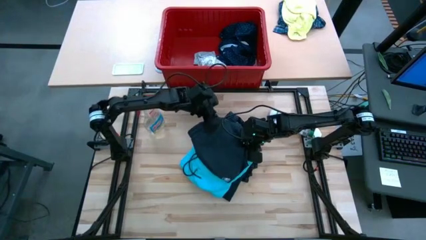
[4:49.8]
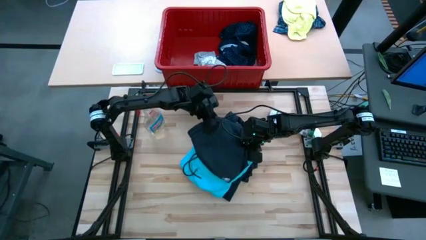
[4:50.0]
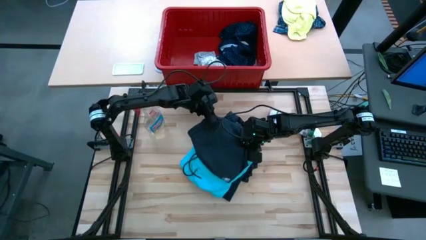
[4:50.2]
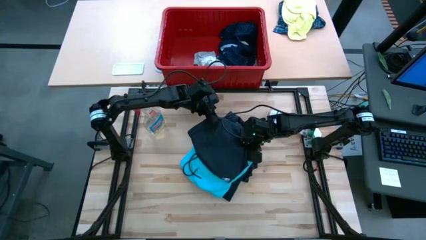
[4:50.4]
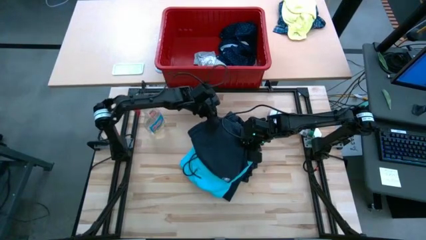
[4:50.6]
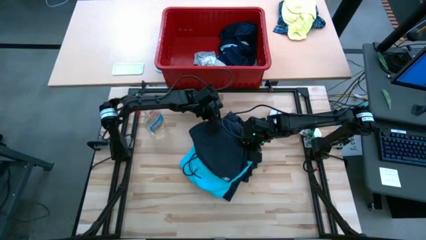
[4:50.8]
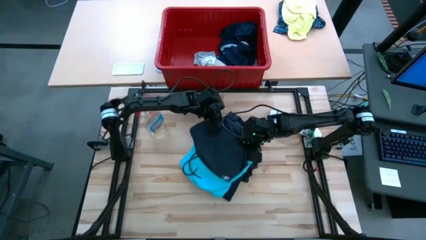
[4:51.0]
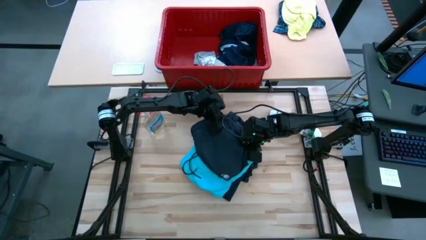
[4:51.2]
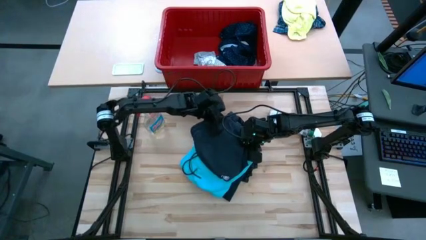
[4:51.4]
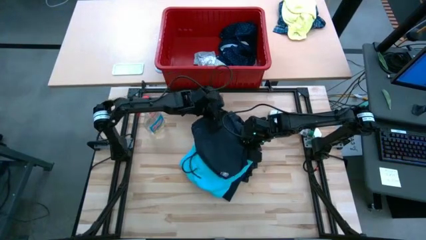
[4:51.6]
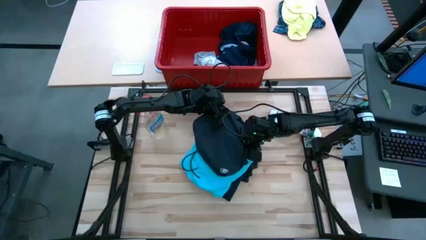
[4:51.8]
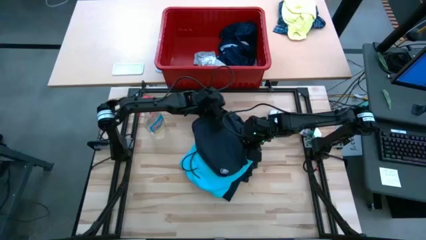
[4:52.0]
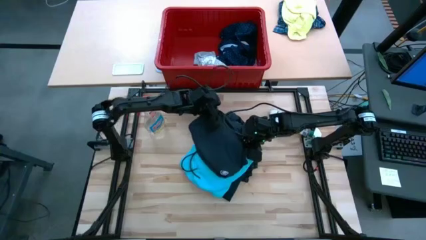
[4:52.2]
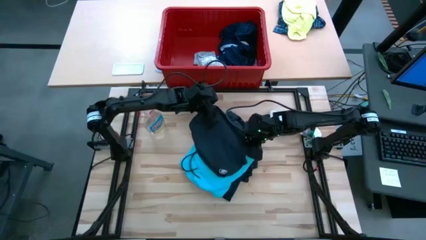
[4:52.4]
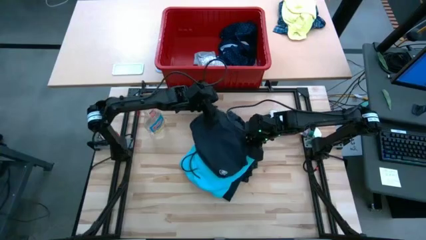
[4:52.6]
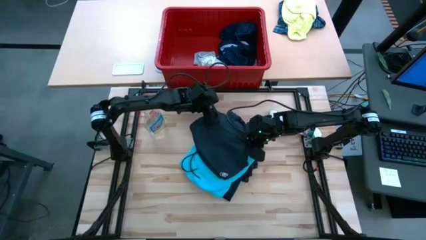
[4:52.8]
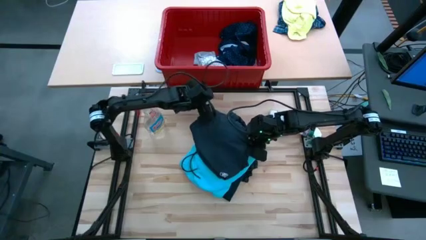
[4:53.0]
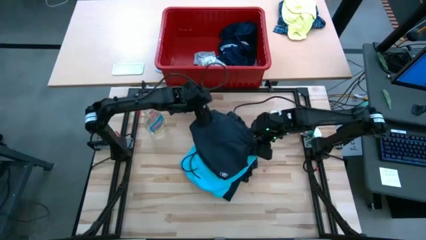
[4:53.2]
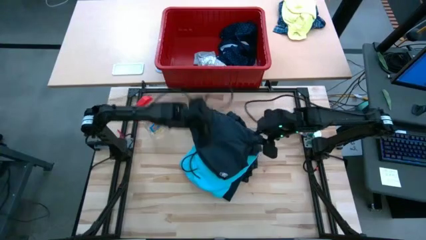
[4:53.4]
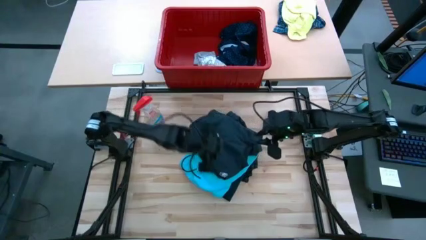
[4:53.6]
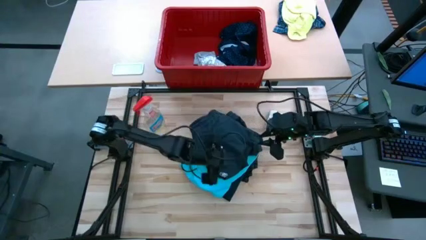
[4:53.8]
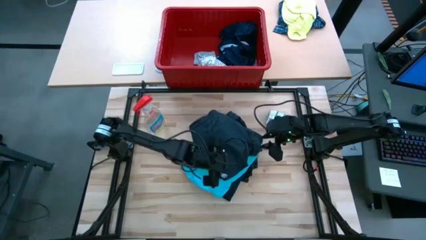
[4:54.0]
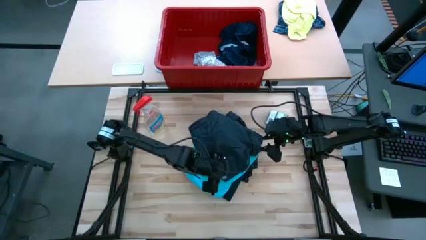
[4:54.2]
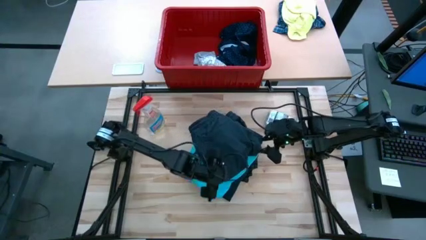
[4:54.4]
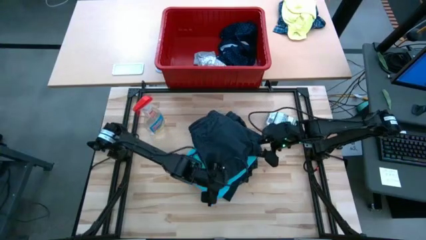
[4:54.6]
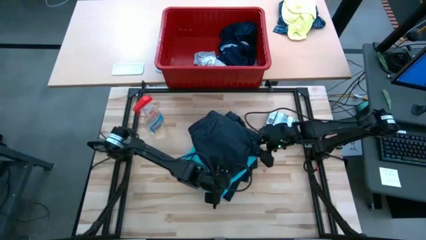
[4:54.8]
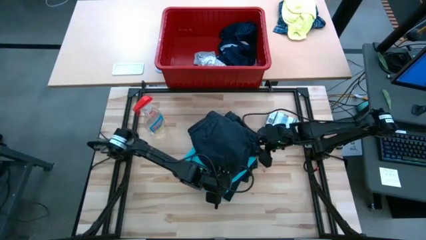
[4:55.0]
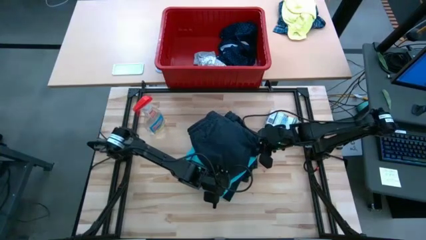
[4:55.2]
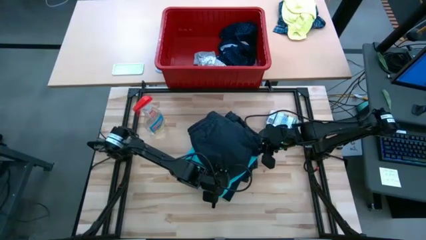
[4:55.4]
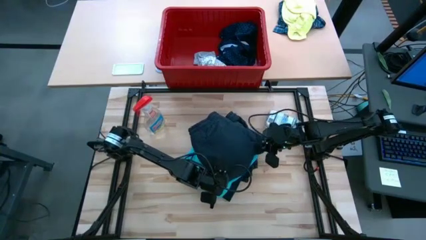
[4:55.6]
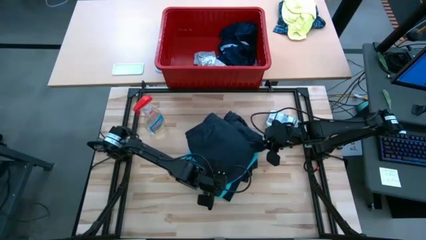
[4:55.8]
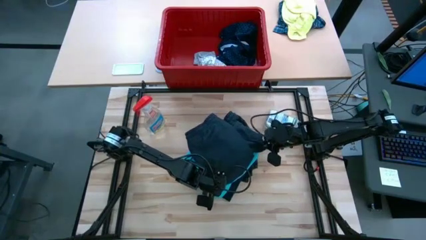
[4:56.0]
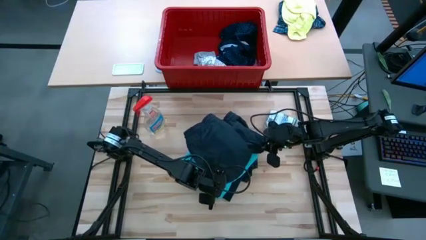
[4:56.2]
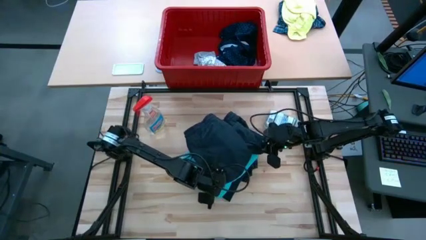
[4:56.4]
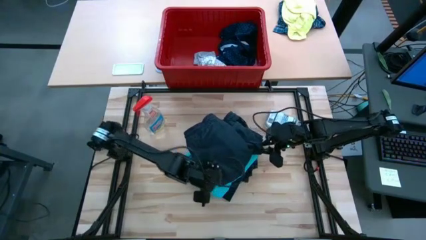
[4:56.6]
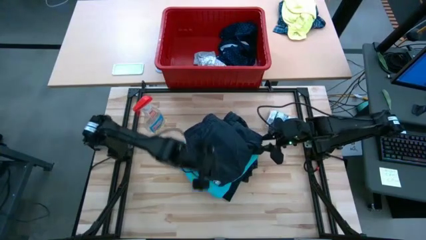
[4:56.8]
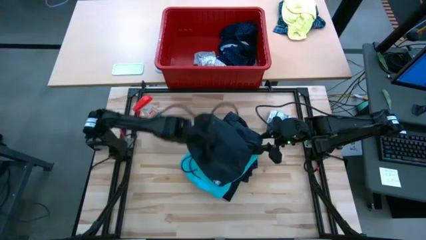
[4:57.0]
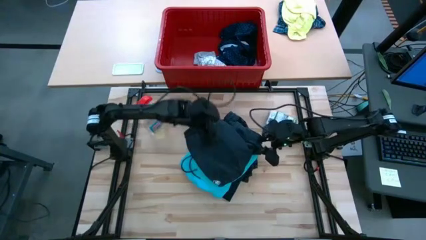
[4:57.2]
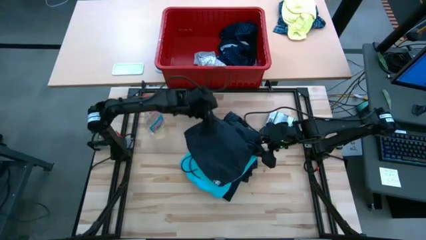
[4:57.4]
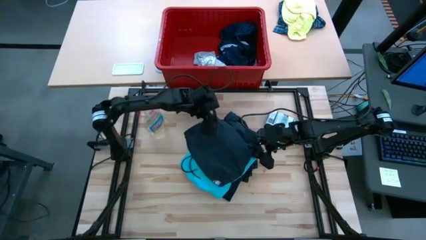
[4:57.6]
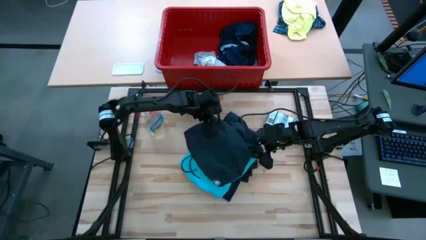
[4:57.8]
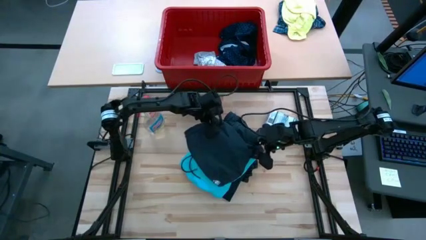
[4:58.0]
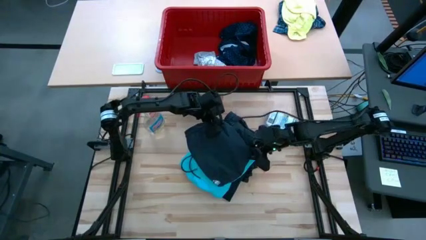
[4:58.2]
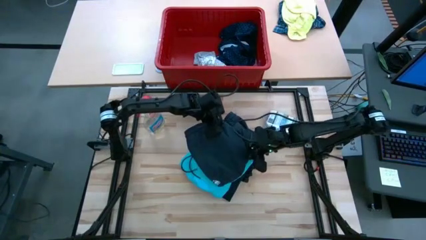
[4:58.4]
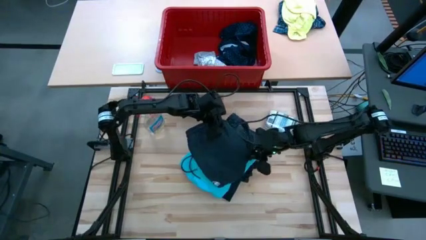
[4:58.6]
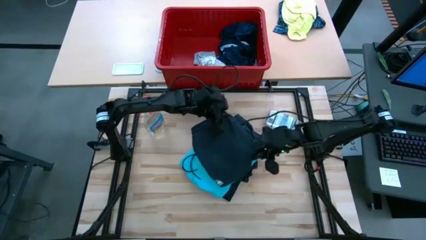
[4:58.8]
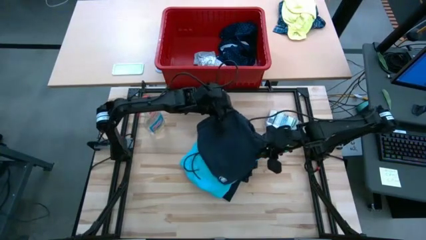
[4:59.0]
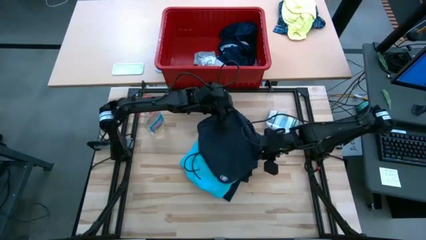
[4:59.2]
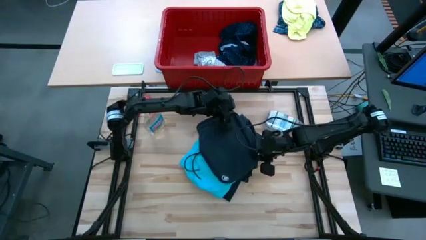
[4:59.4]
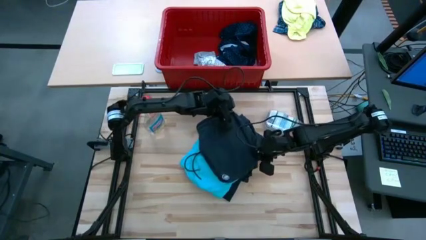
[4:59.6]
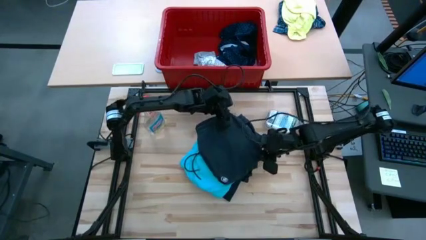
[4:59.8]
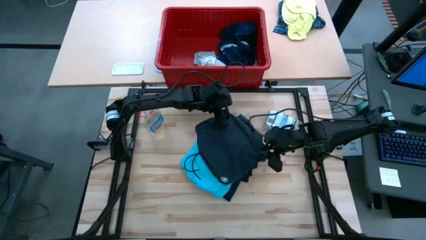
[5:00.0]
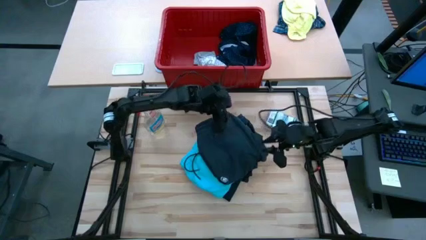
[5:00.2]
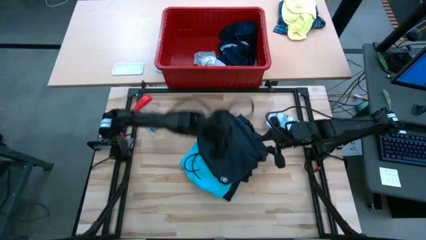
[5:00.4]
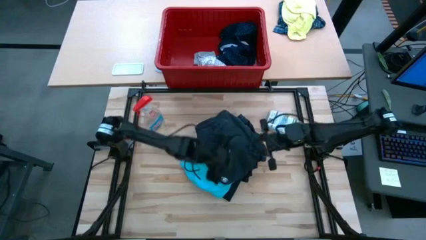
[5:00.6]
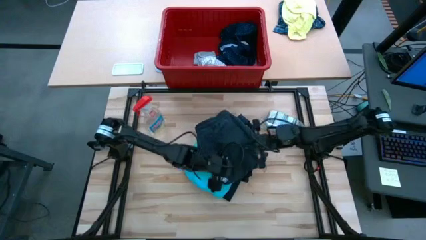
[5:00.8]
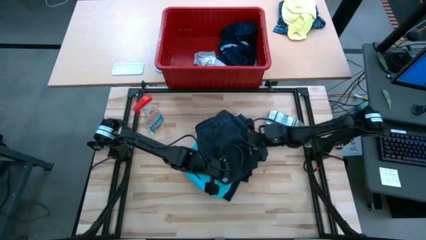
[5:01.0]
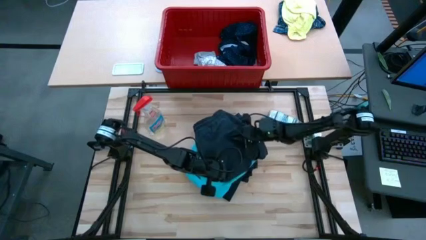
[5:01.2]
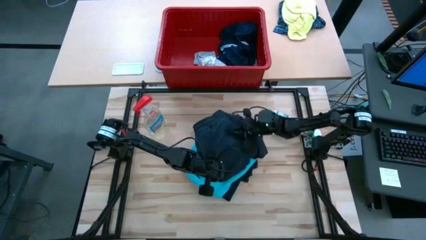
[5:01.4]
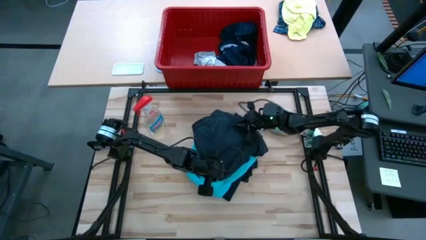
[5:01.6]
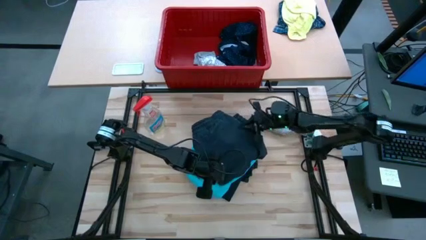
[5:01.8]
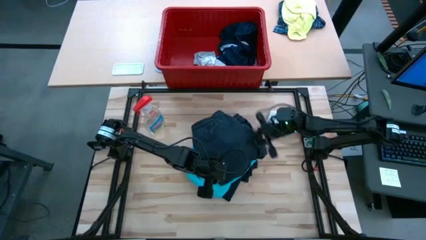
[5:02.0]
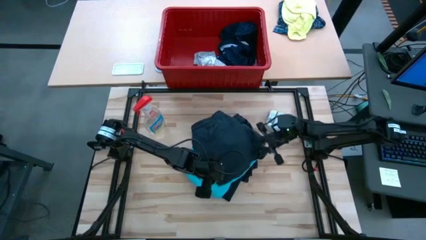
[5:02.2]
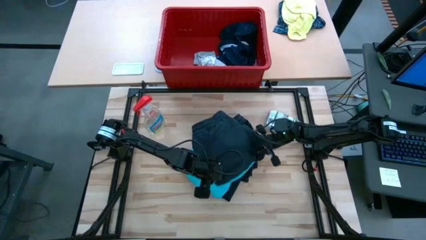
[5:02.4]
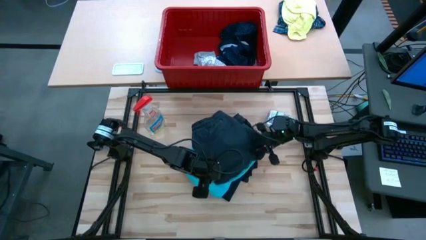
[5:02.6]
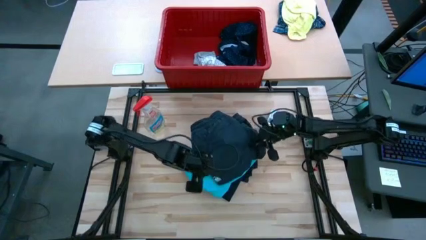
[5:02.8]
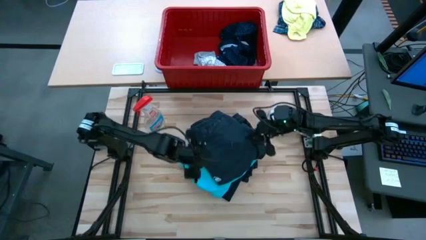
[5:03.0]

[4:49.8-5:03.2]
Task: Fold Laundry from Bin
Fold the black shorts
